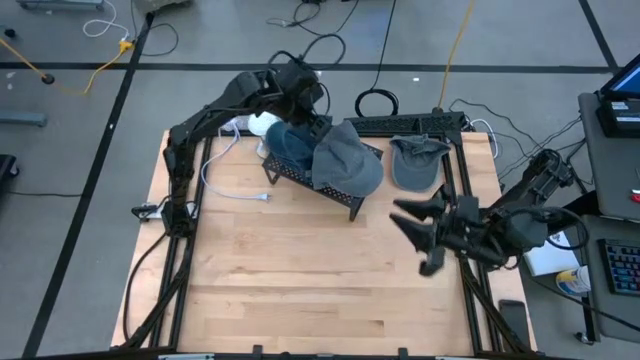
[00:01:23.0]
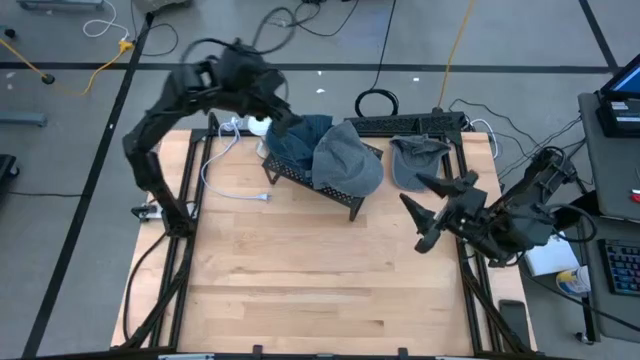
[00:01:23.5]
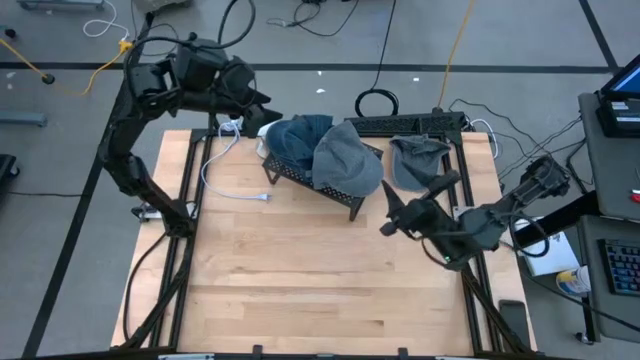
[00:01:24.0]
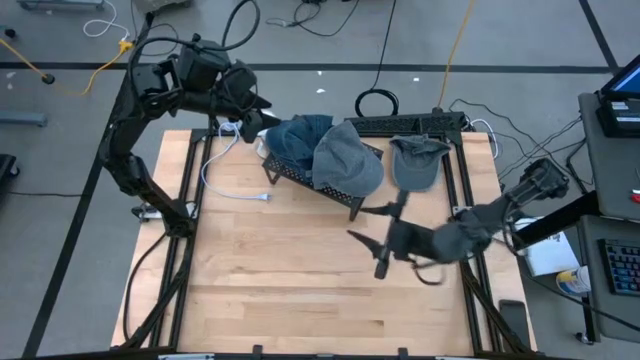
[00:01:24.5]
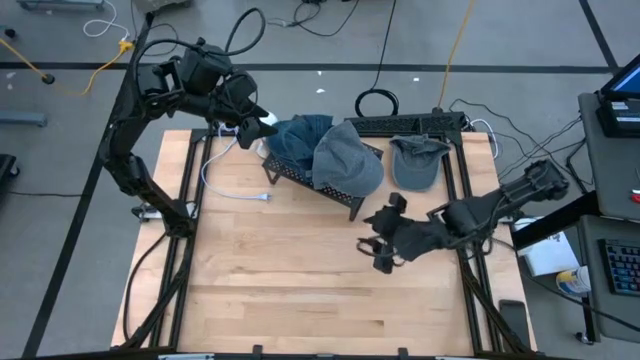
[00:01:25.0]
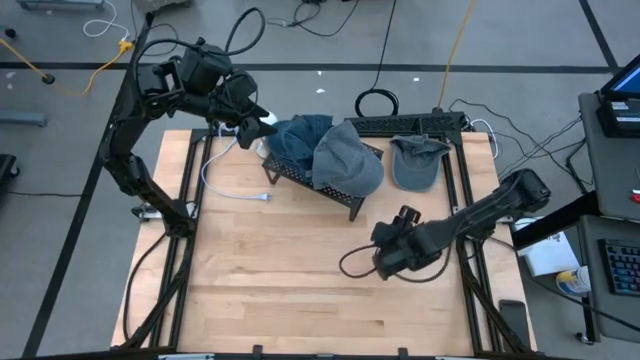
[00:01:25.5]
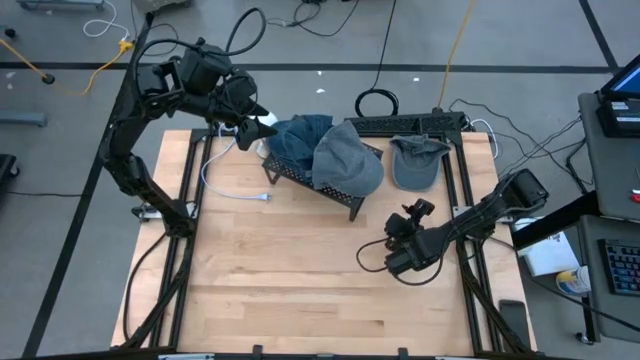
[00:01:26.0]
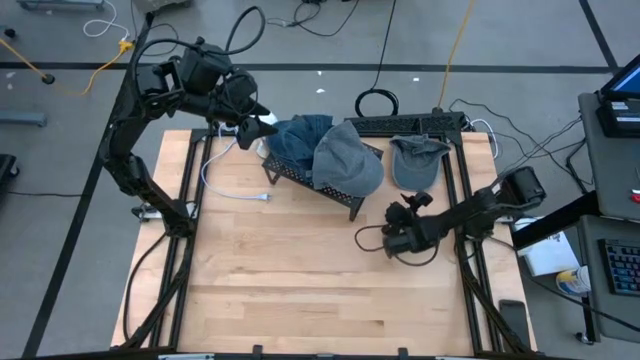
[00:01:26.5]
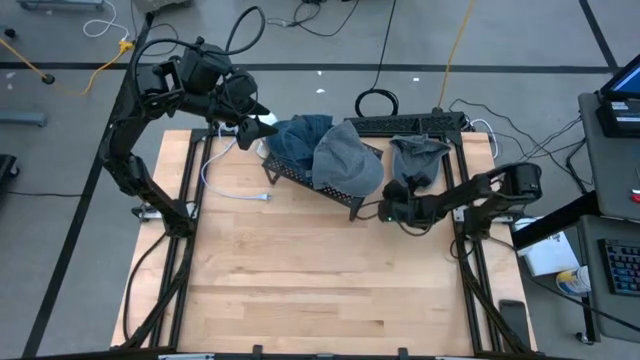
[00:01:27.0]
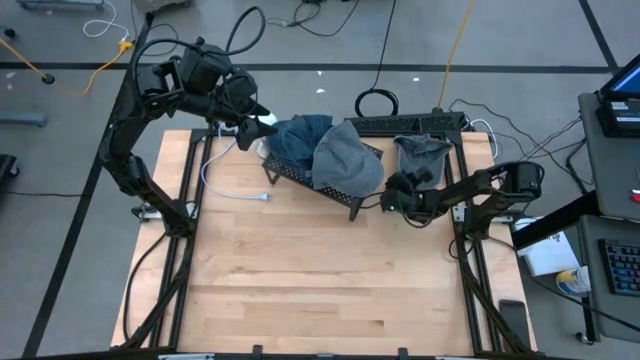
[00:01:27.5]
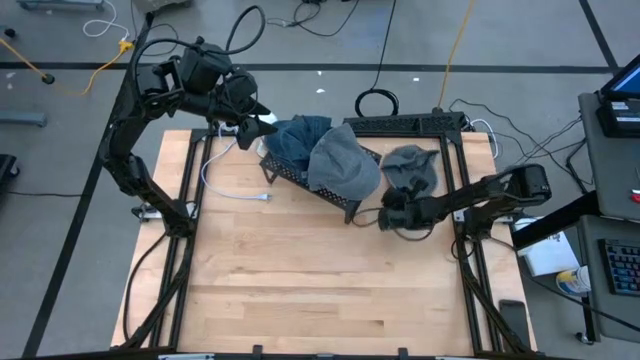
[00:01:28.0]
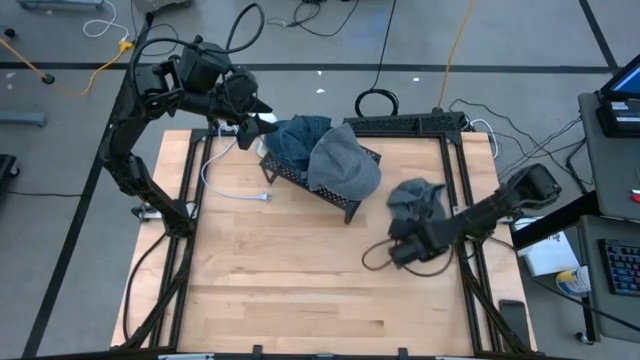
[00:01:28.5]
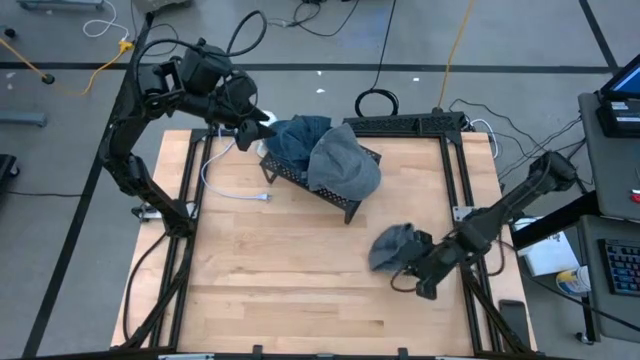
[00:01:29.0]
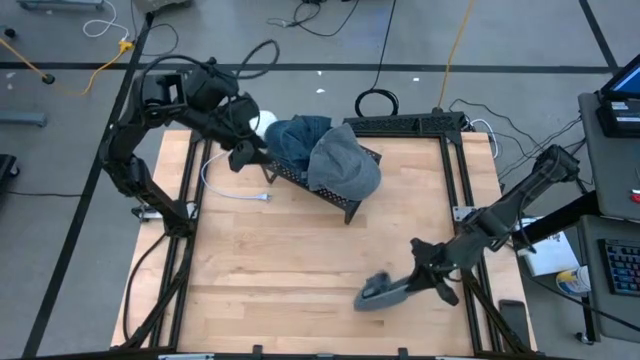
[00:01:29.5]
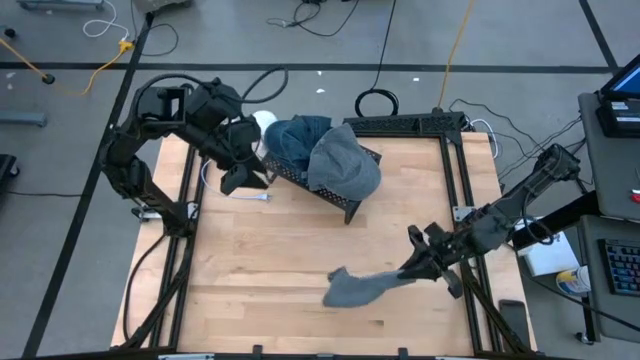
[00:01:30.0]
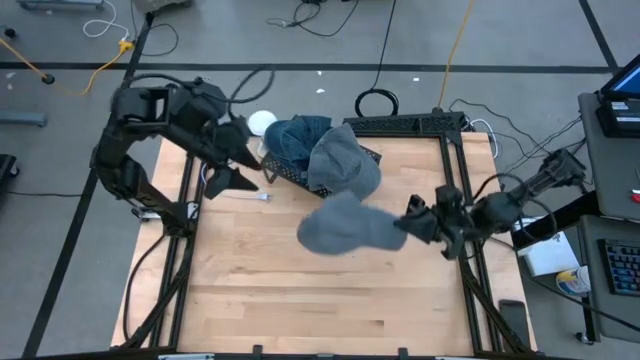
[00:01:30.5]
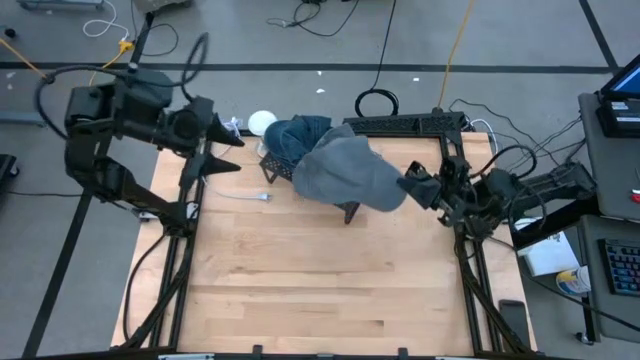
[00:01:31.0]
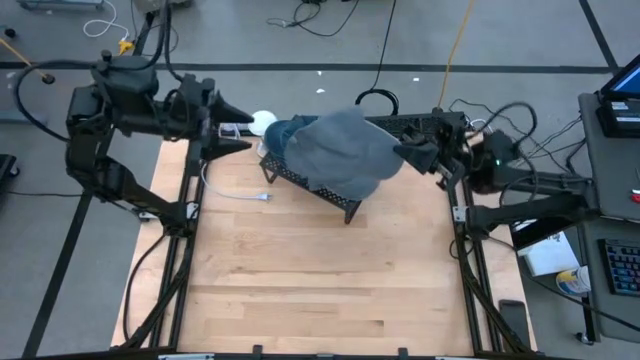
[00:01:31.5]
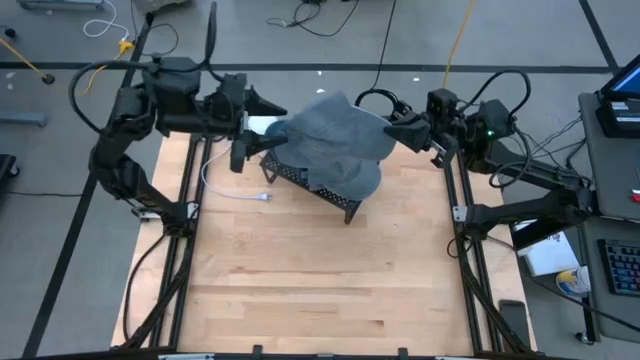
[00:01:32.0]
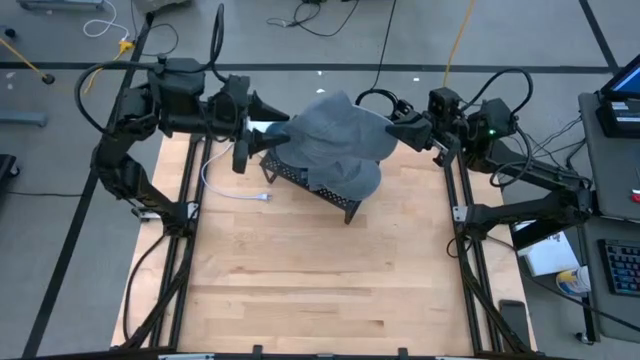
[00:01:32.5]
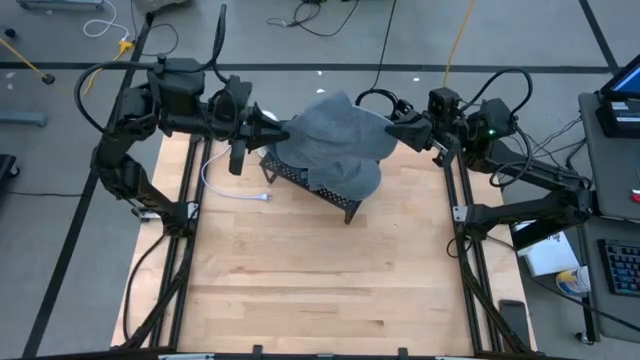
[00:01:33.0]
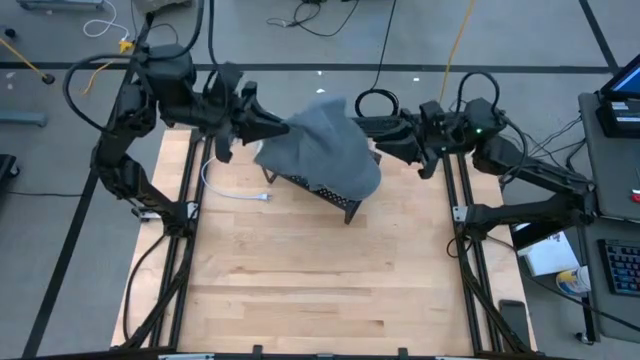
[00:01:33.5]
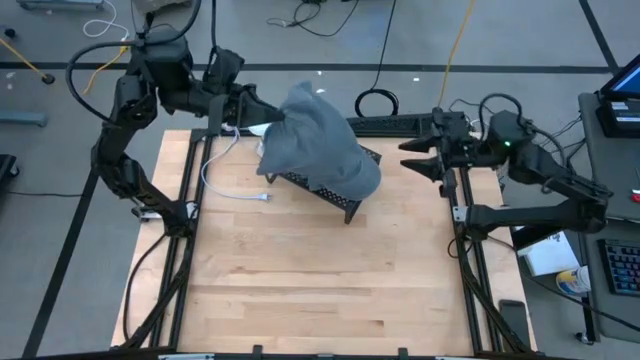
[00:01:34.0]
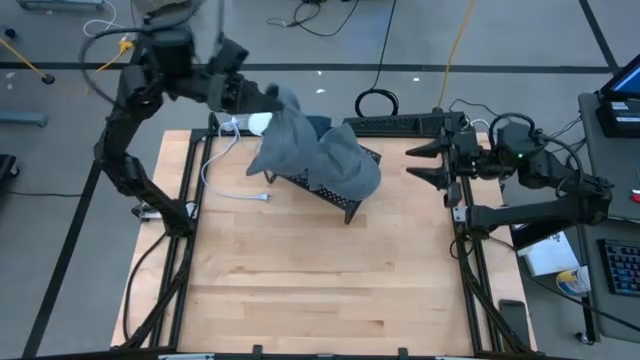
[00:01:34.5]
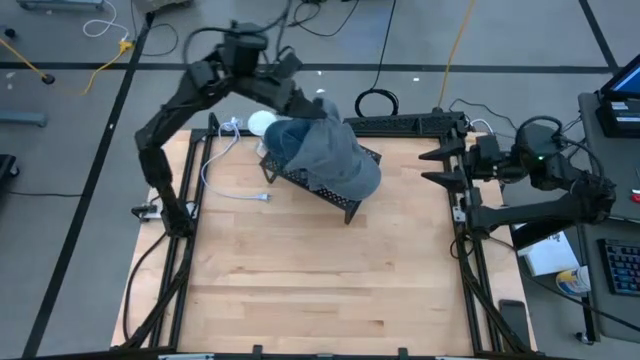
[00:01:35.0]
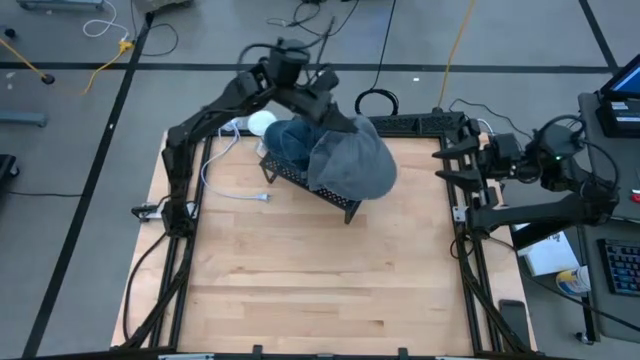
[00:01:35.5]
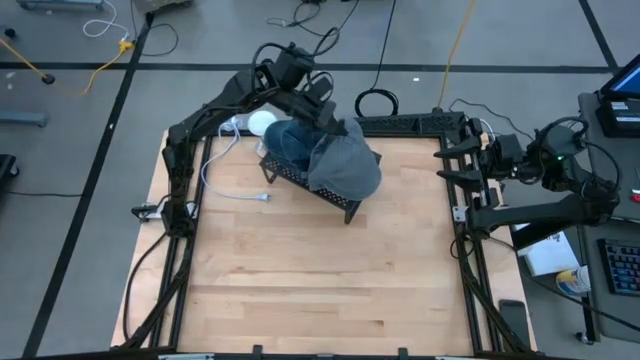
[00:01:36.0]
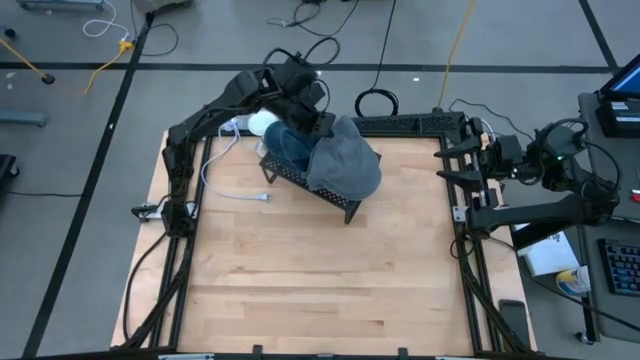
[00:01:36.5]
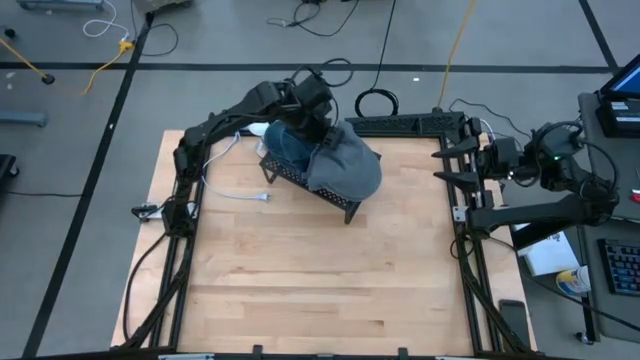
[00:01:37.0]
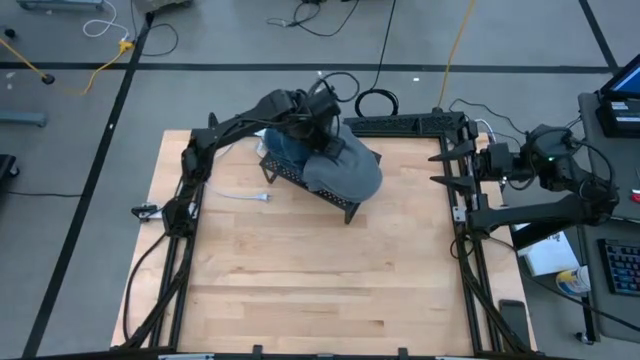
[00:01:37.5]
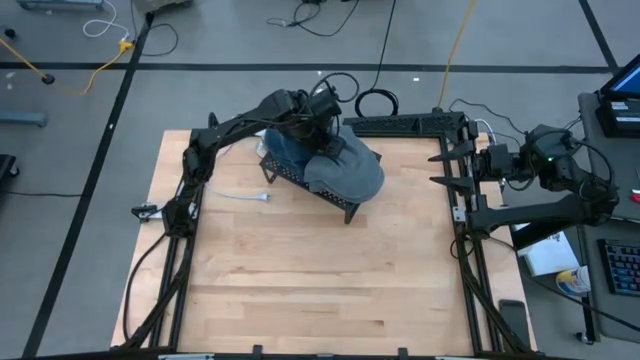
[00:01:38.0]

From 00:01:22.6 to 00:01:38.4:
Task: Pick & Place hat
Stack the gray cap on the gray caps on the shelf

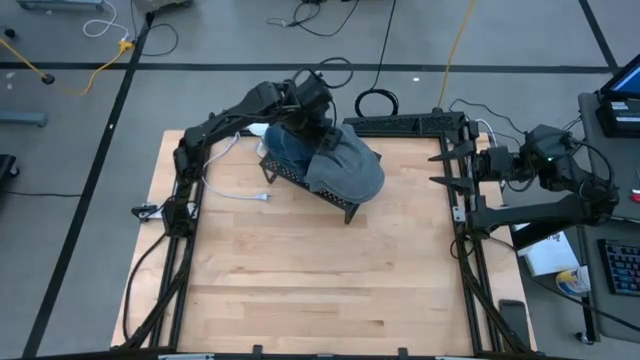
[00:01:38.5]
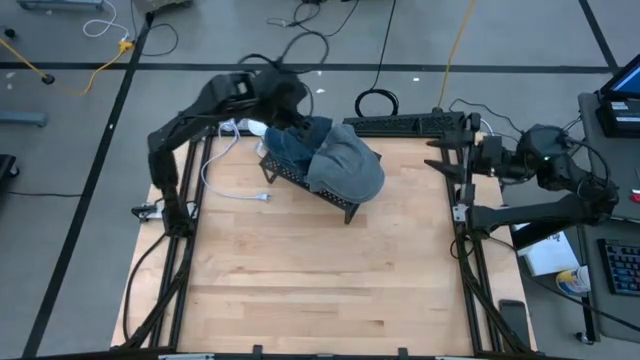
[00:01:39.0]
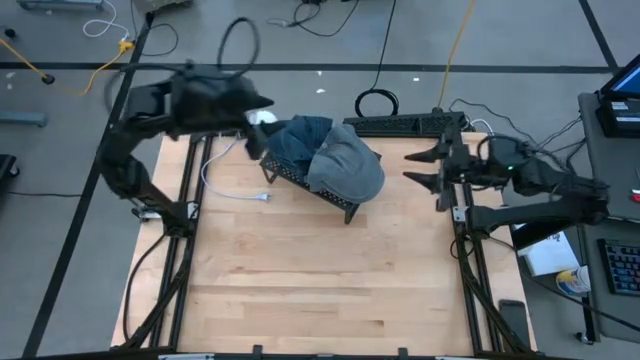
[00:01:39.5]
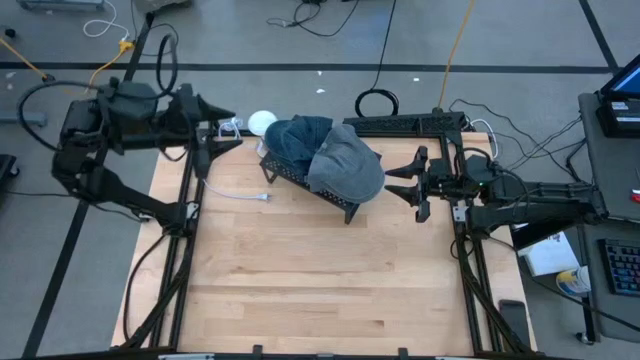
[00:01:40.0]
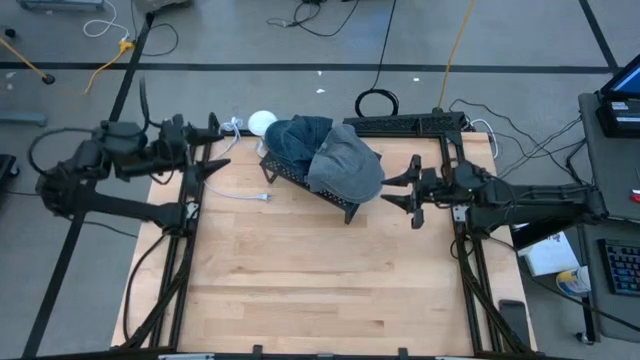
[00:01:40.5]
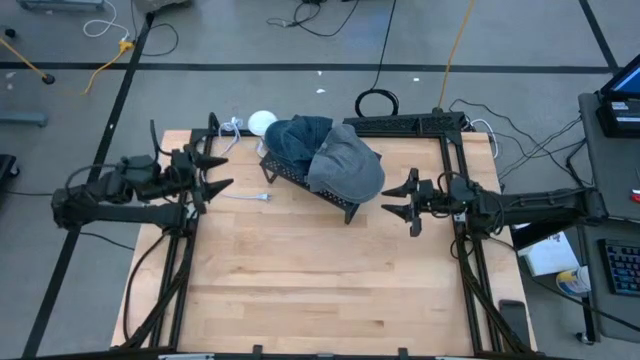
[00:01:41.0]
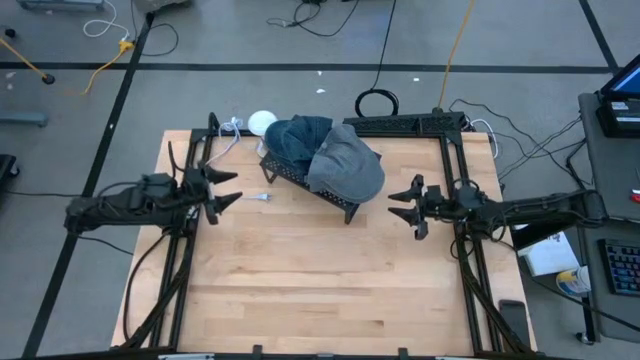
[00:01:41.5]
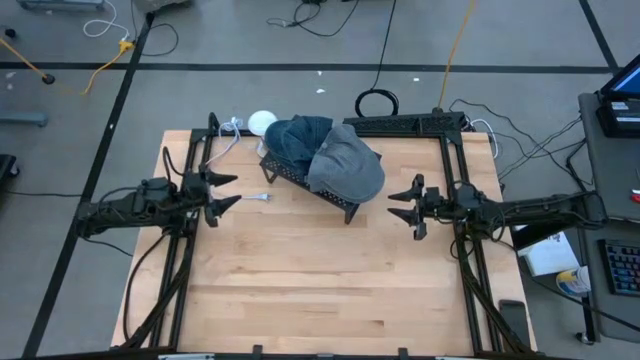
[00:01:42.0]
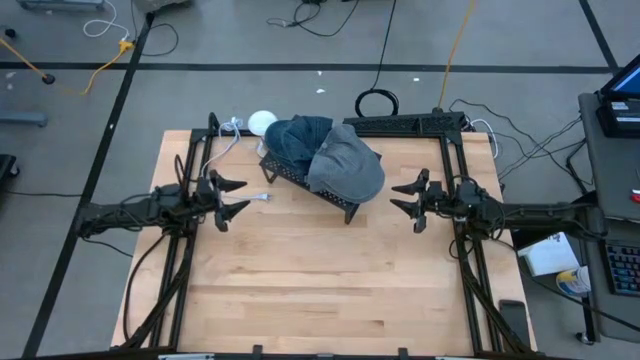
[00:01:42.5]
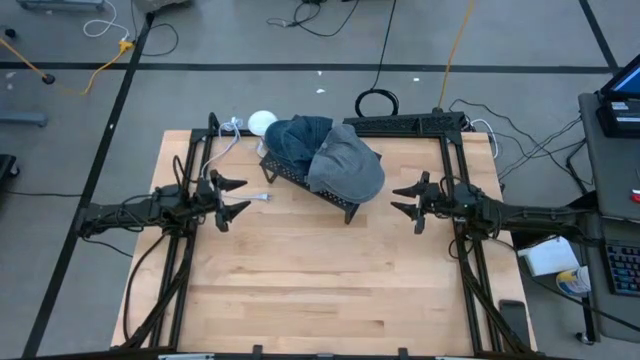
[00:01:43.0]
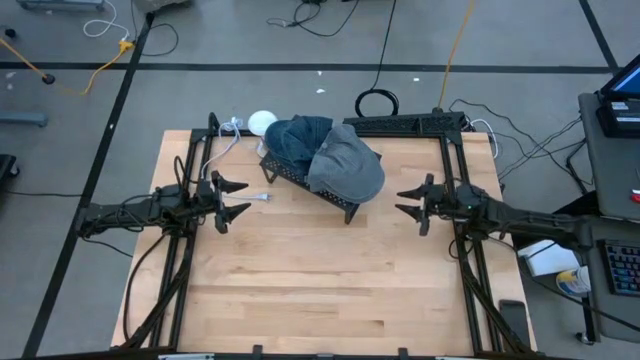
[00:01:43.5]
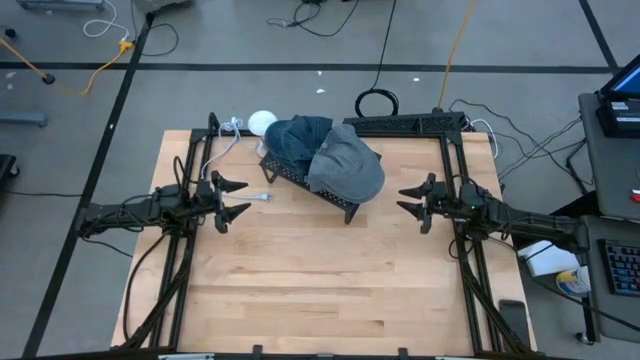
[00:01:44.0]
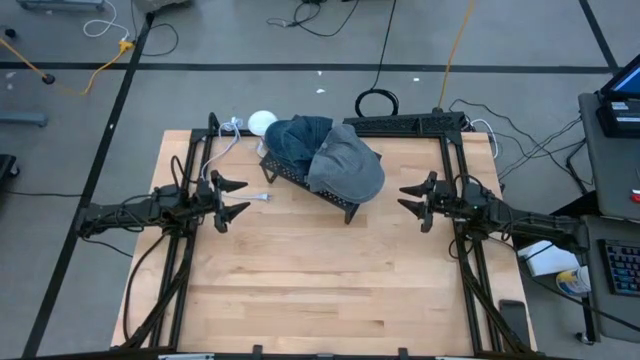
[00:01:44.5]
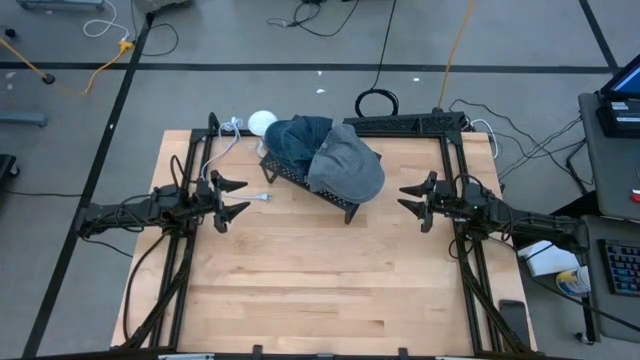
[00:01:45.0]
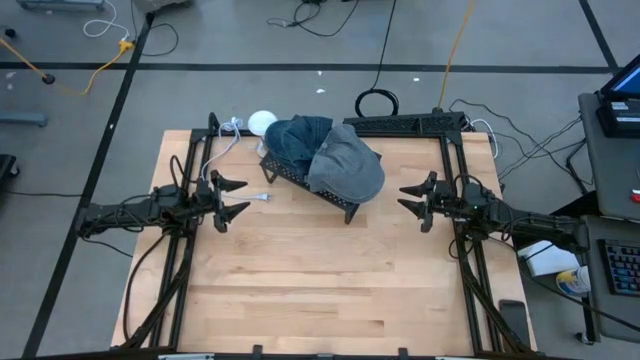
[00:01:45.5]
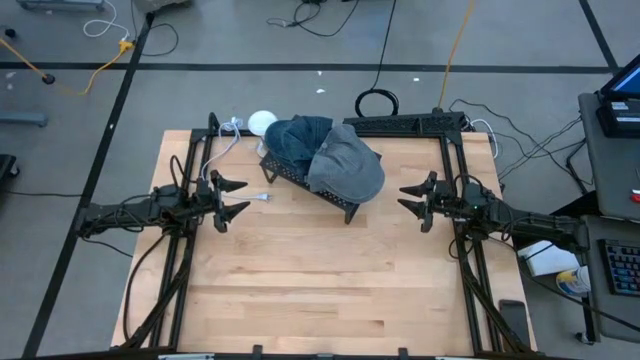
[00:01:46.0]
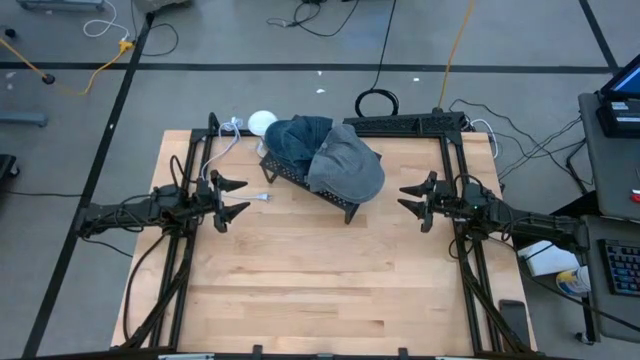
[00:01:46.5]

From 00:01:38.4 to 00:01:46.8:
Return to Home Position
